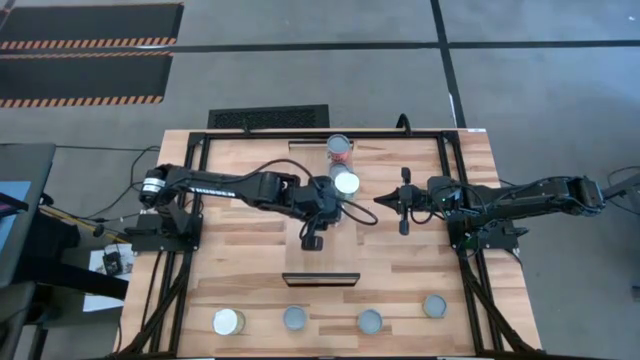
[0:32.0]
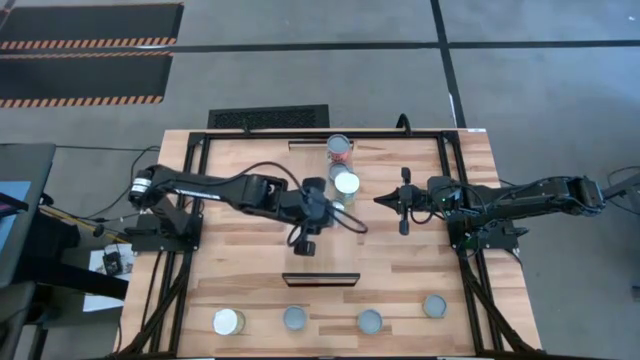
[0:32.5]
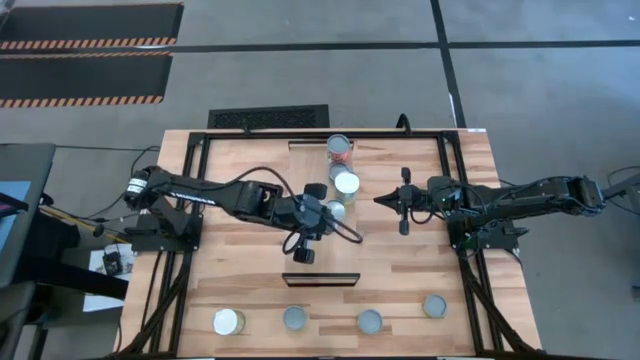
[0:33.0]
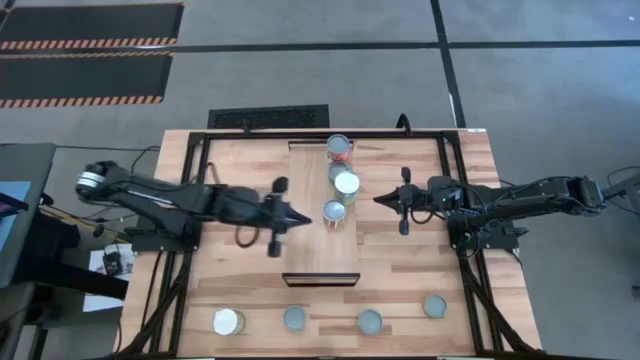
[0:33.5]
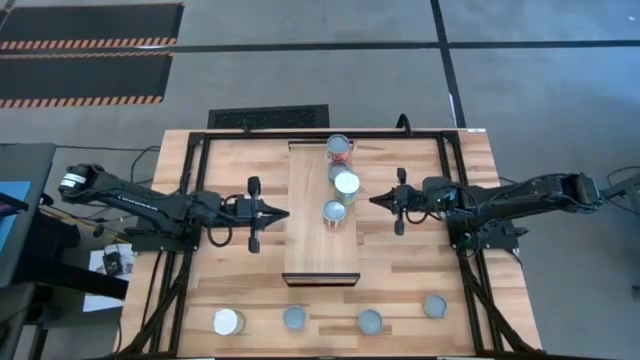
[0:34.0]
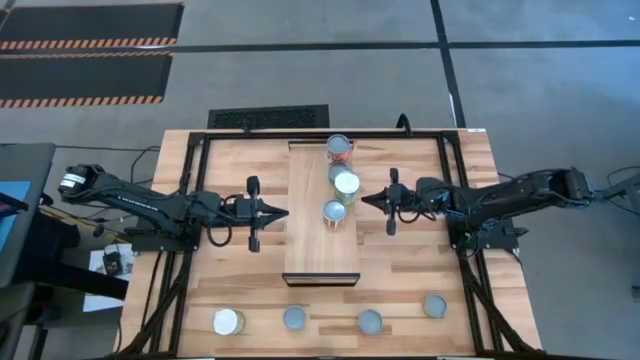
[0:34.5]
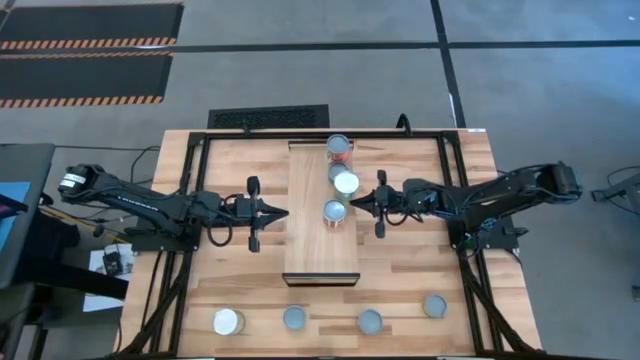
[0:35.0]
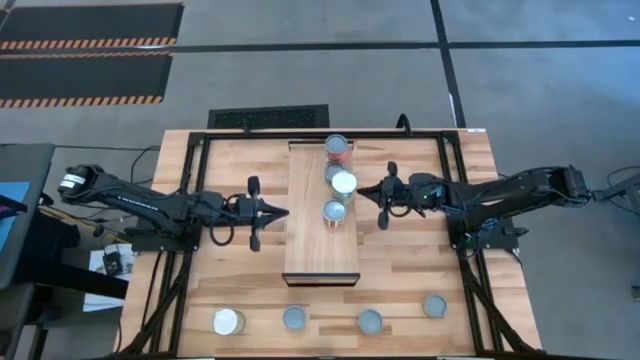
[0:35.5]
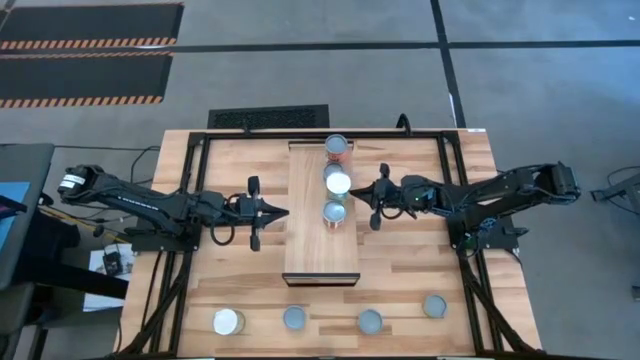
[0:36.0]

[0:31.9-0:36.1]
Task: Pick and place cans onto a shelf
Adjust the big blue can on the shelf

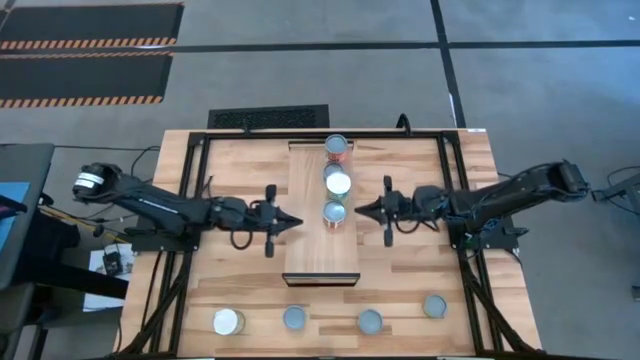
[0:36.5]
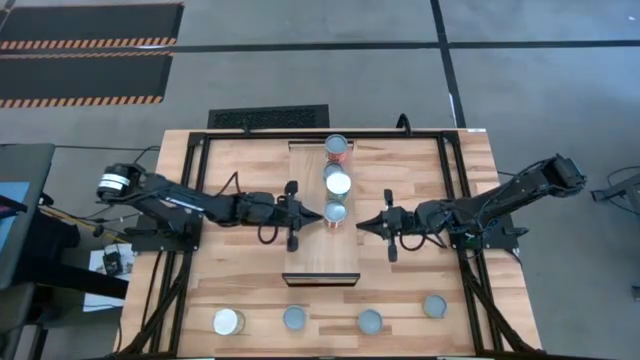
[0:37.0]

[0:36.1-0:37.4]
Adjust the small red can on the shelf

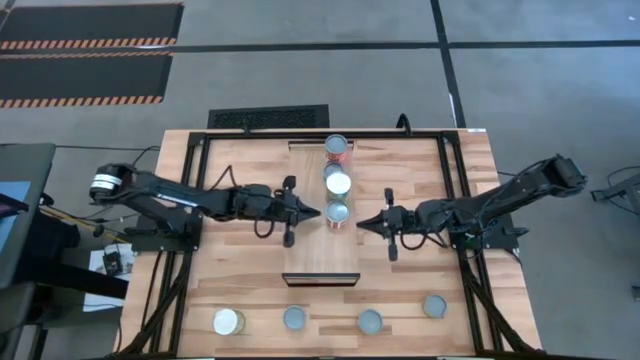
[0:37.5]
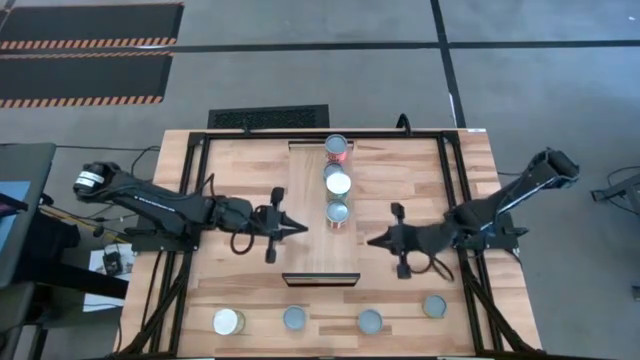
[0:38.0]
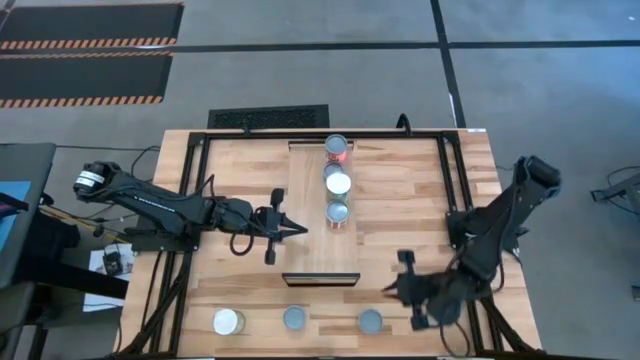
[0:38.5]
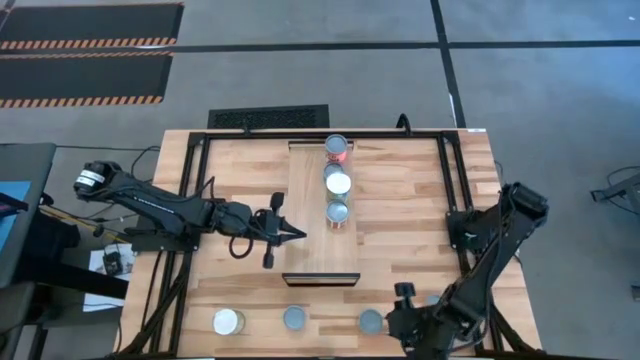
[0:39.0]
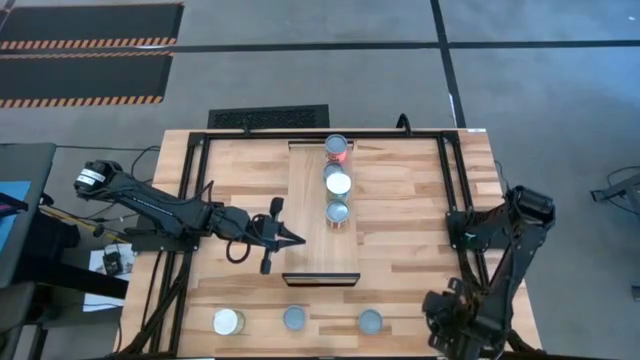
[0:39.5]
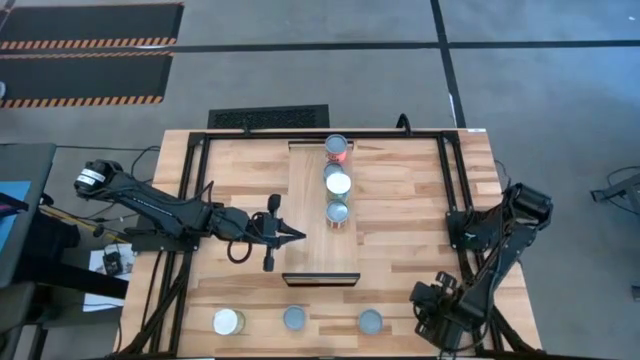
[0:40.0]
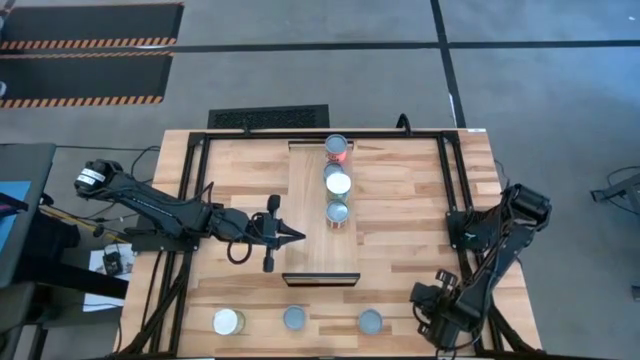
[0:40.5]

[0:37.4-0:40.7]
Put the small yellow can on the shelf

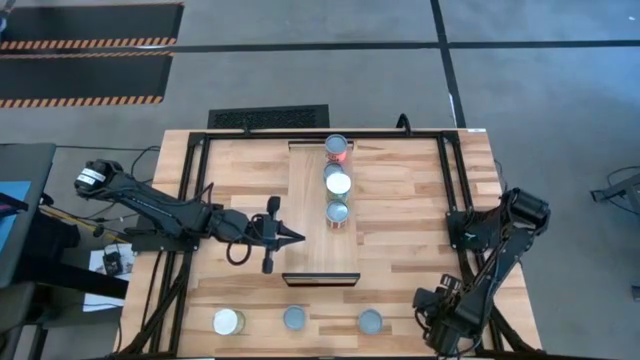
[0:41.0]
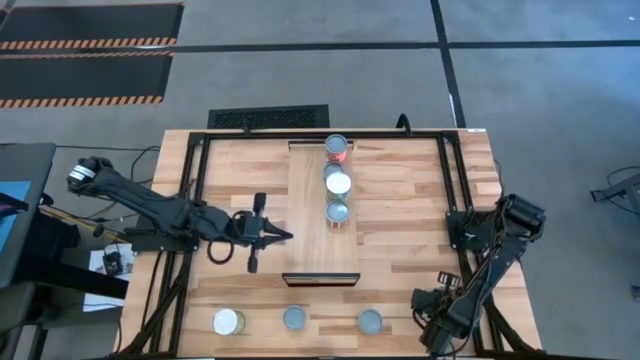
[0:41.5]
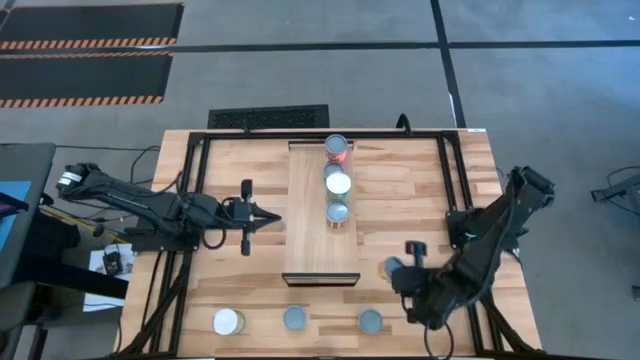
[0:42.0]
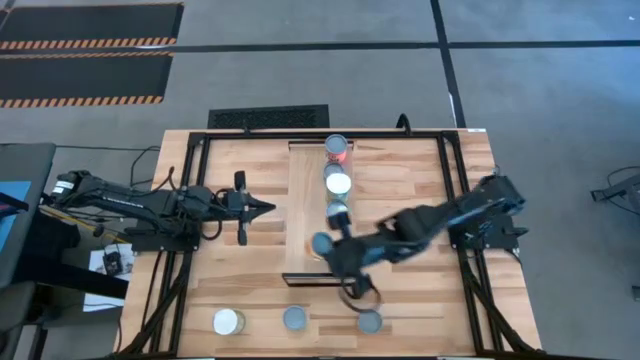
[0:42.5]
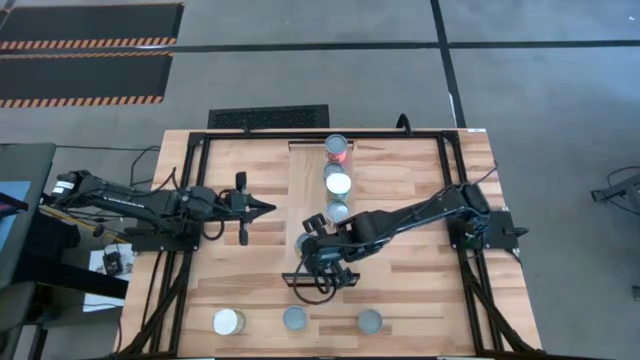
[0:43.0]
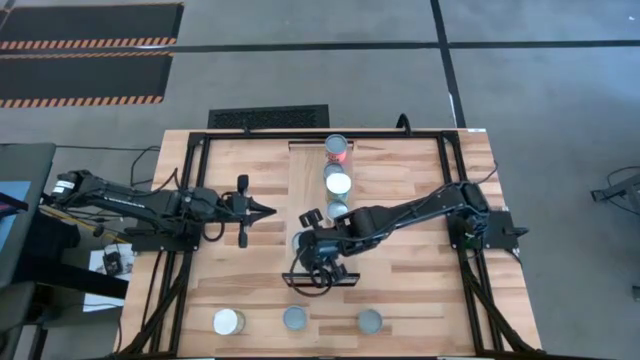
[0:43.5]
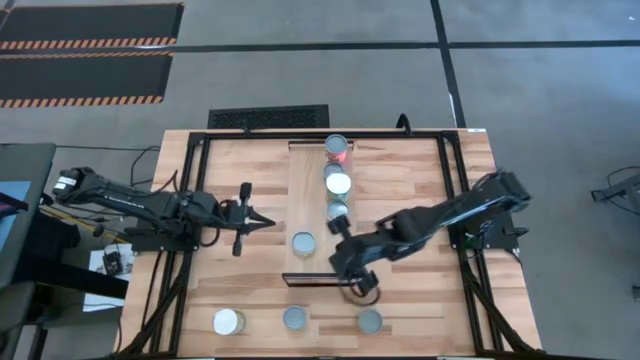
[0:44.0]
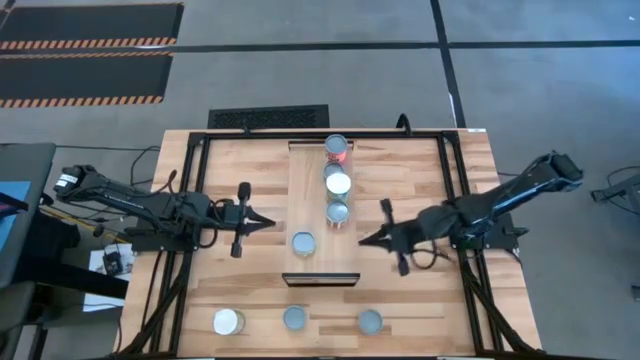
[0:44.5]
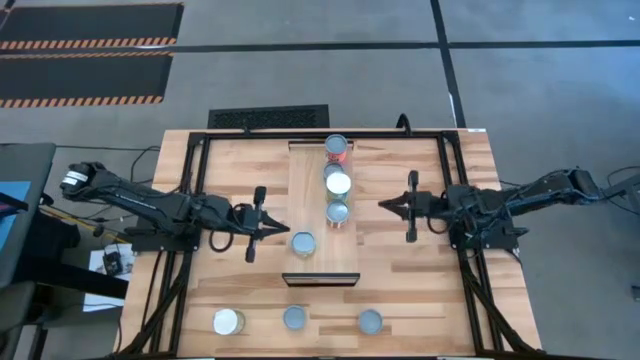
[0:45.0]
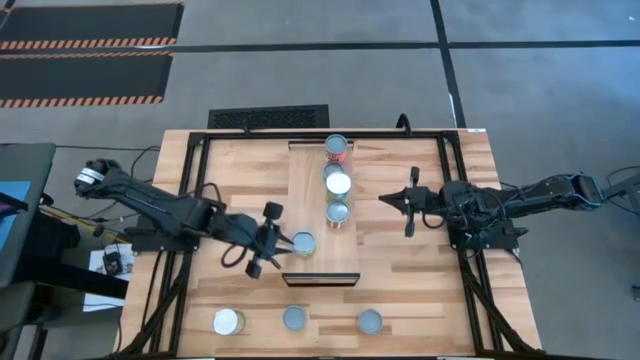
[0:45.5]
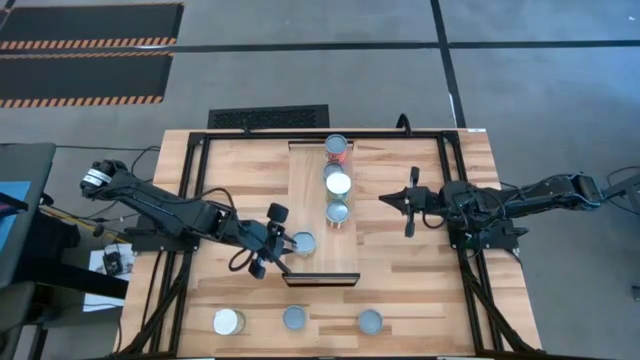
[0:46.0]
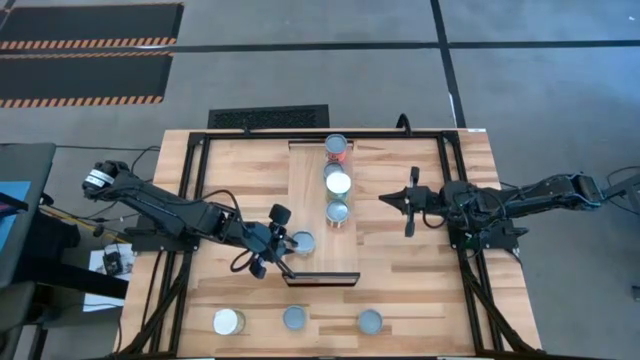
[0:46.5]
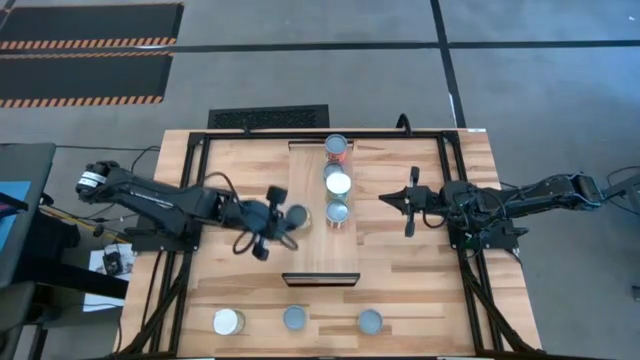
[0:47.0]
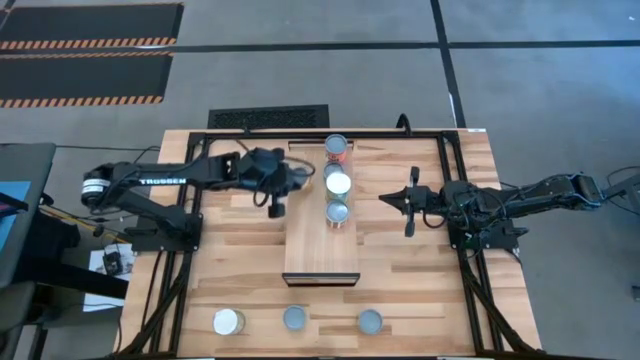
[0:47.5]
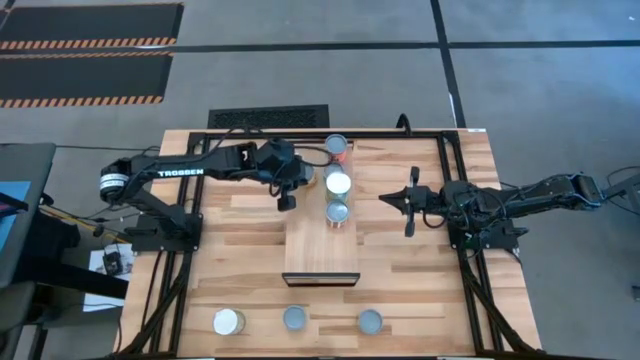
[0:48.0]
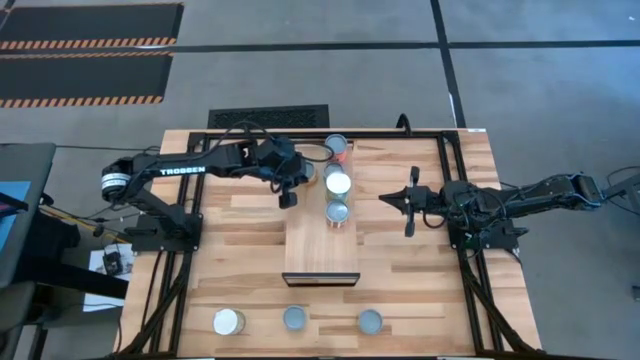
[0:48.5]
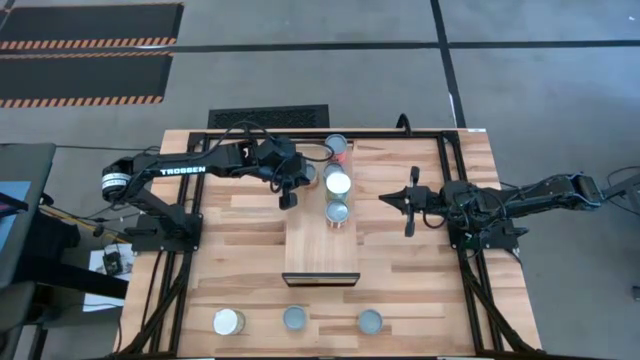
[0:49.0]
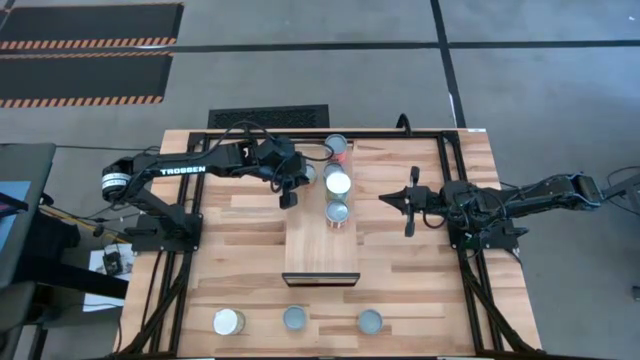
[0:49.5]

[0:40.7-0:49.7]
Put the small yellow can on the shelf aligned with the other small blue can

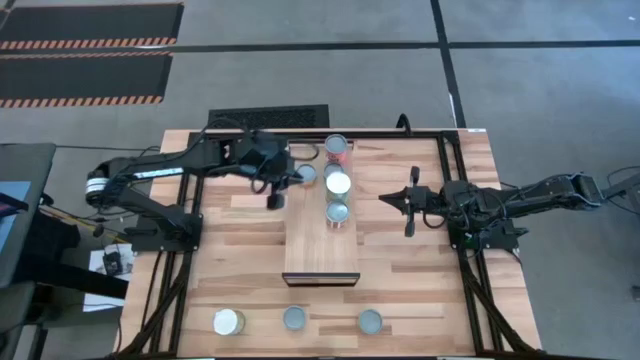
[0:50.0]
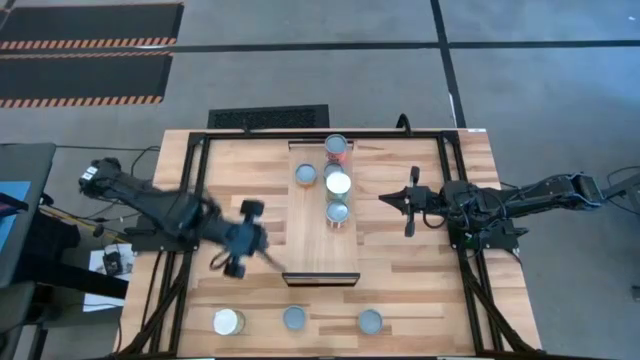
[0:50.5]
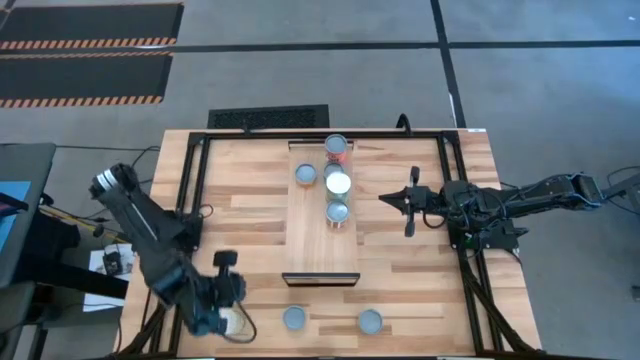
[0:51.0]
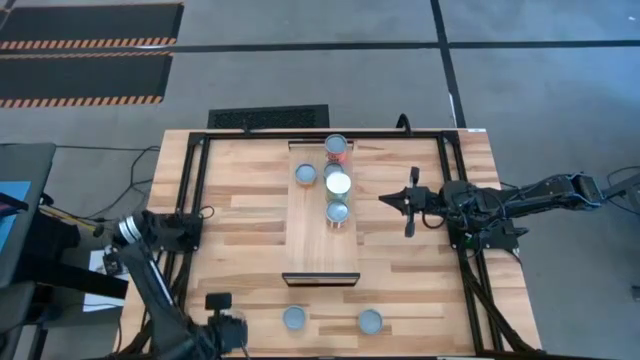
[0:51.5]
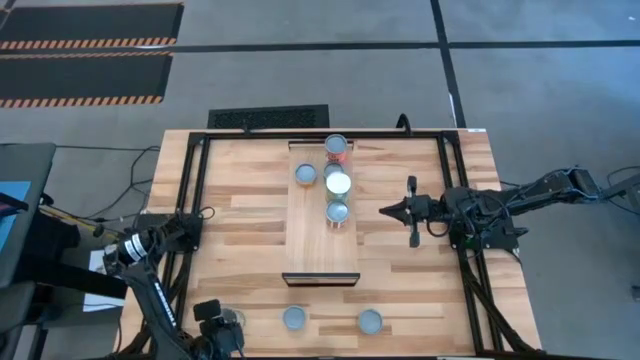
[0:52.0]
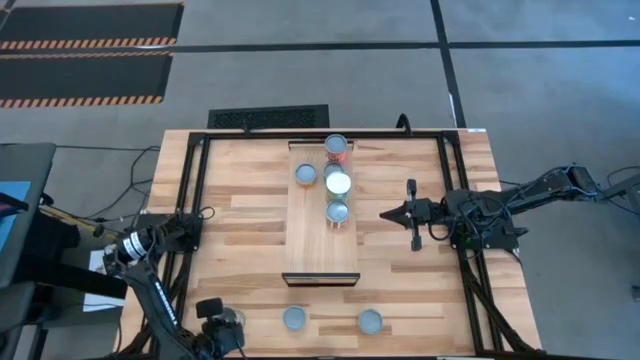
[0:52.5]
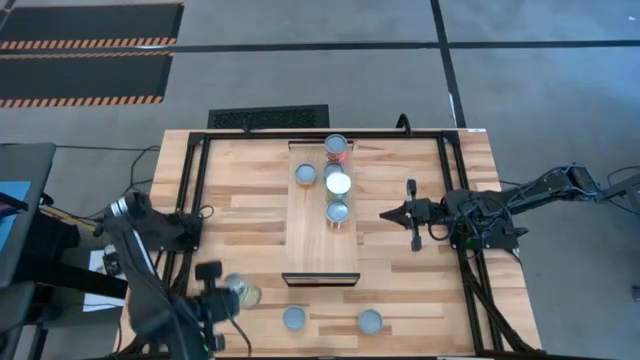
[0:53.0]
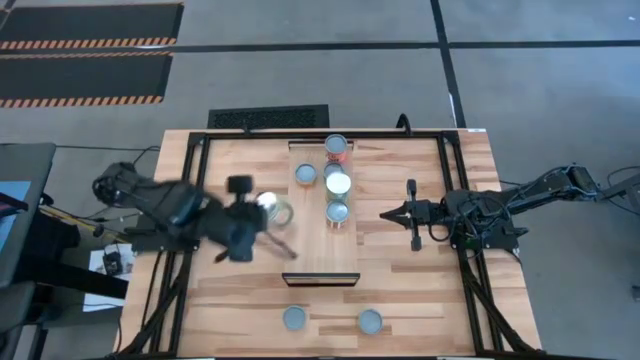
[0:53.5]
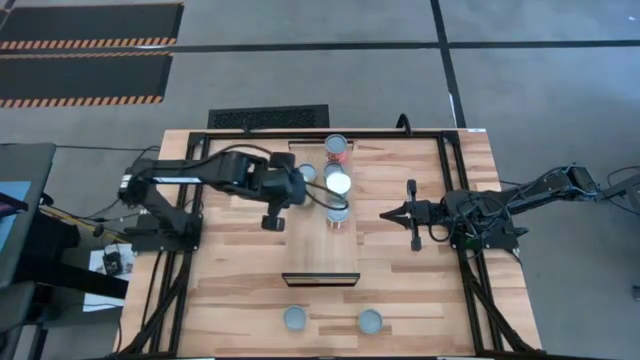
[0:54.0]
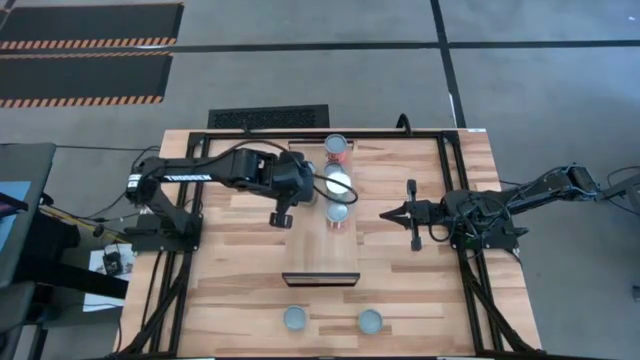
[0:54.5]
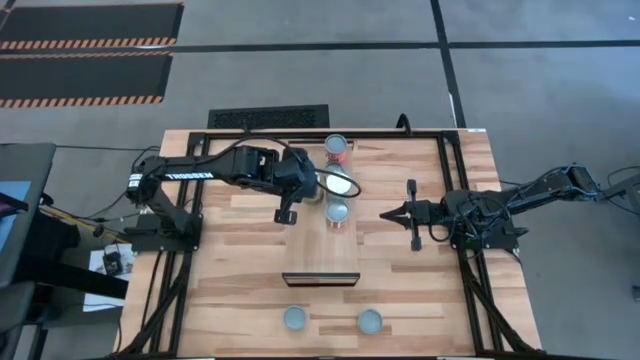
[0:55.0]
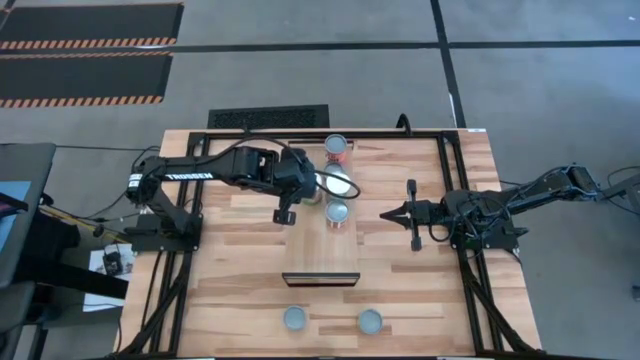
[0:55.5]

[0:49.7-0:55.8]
Put the left big green can on the shelf aligned with the other big blue can
